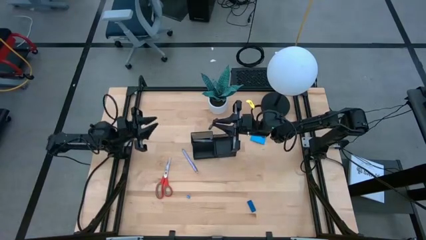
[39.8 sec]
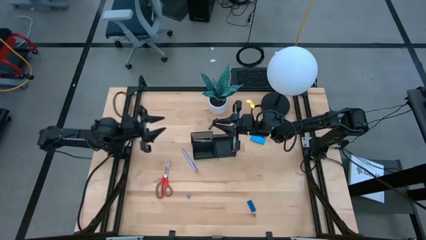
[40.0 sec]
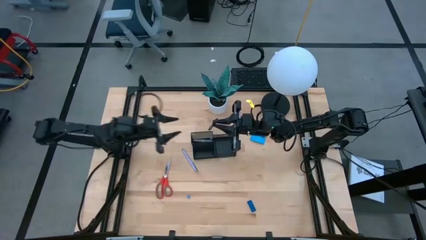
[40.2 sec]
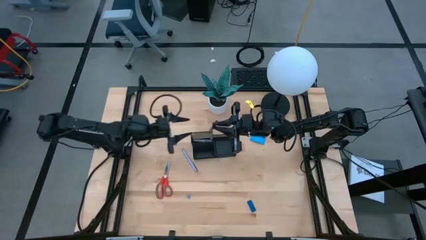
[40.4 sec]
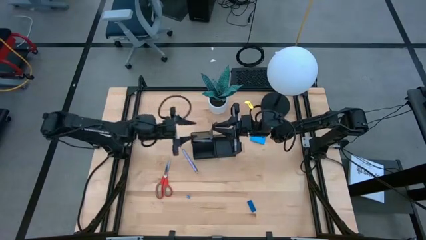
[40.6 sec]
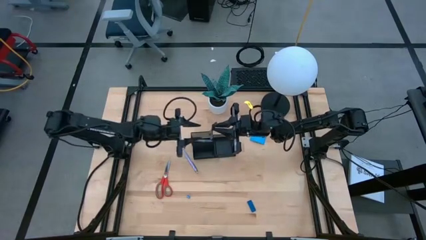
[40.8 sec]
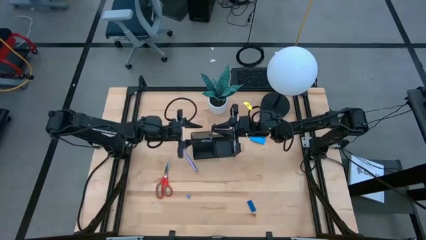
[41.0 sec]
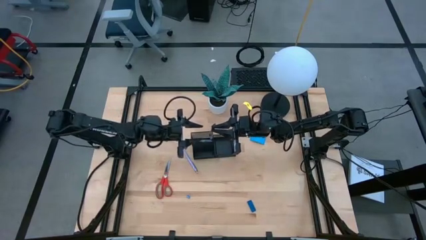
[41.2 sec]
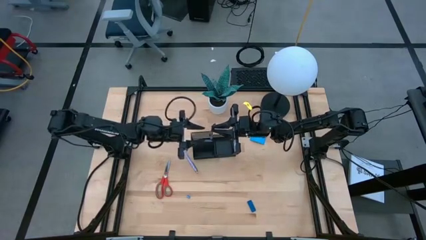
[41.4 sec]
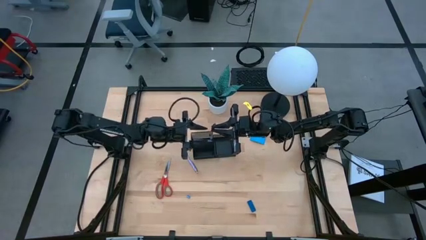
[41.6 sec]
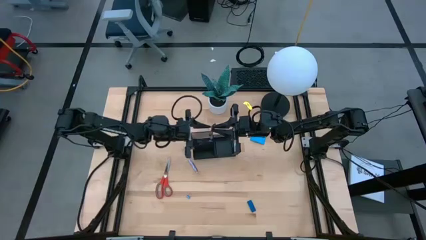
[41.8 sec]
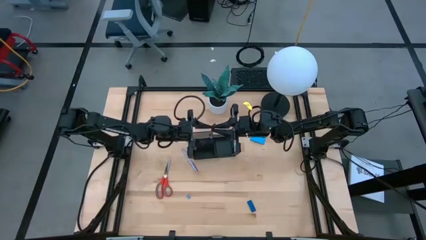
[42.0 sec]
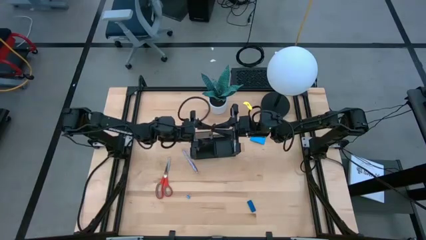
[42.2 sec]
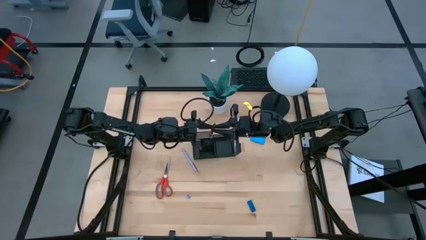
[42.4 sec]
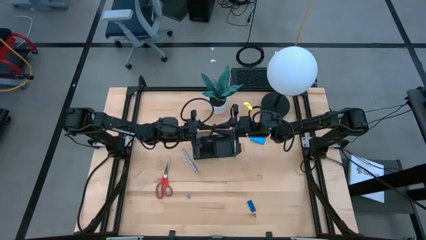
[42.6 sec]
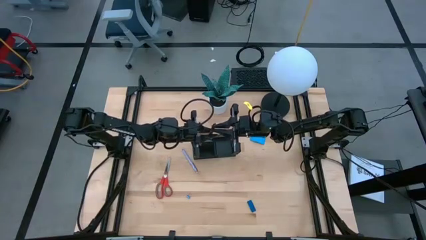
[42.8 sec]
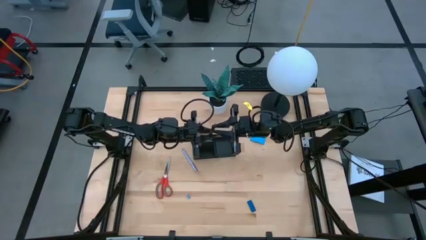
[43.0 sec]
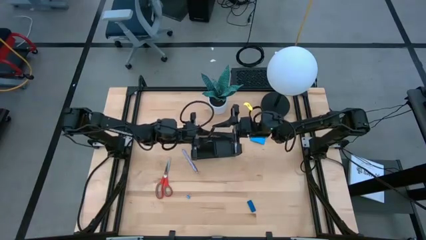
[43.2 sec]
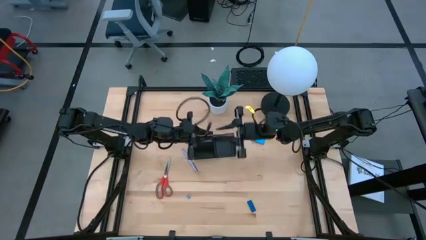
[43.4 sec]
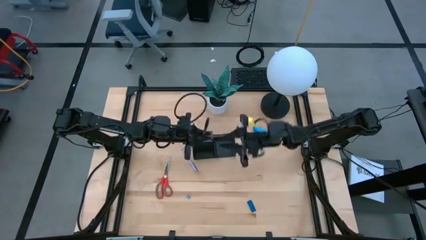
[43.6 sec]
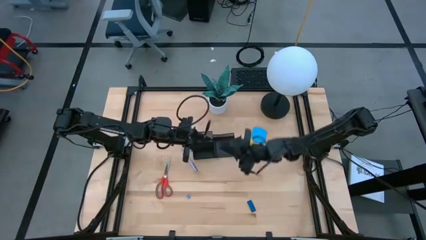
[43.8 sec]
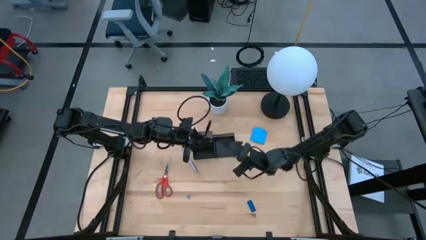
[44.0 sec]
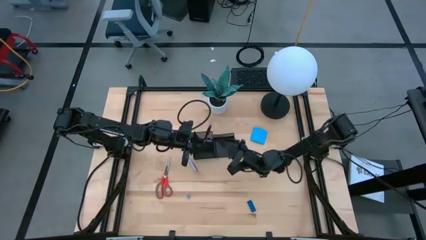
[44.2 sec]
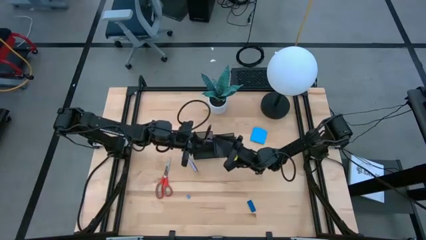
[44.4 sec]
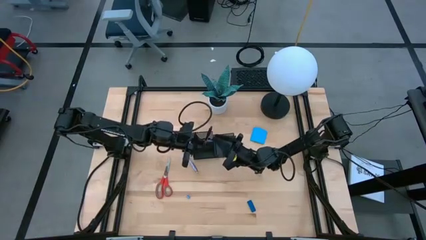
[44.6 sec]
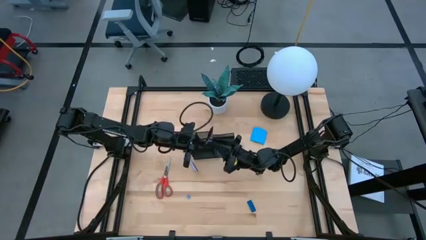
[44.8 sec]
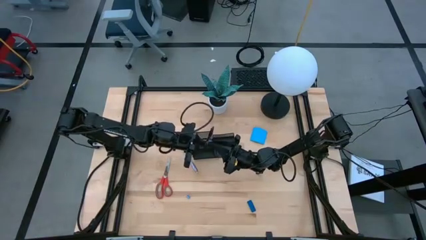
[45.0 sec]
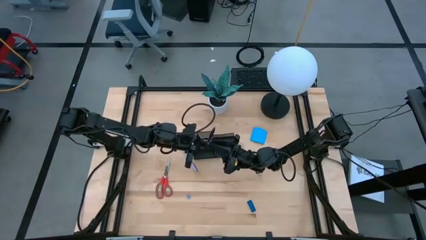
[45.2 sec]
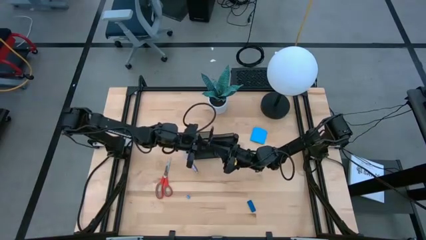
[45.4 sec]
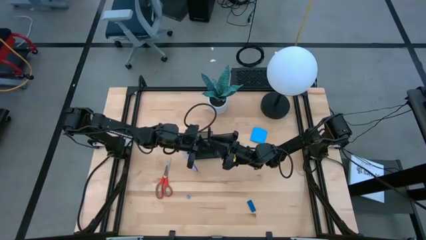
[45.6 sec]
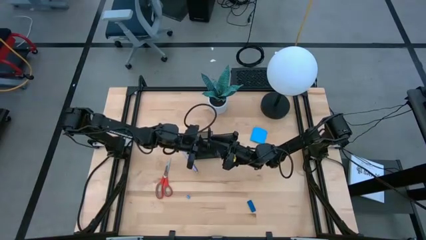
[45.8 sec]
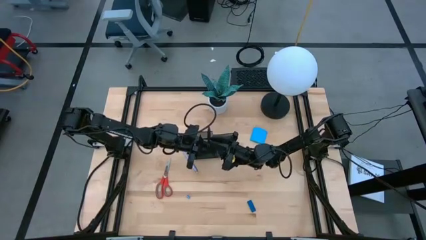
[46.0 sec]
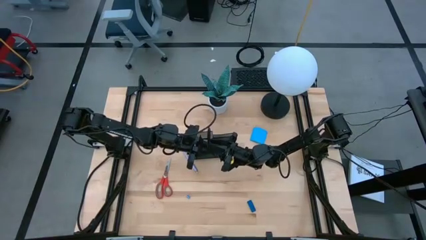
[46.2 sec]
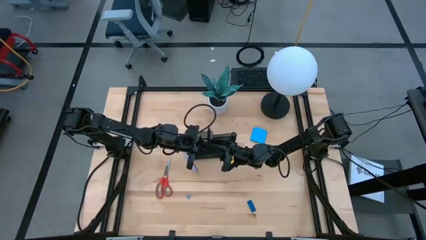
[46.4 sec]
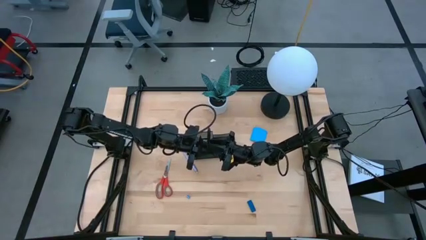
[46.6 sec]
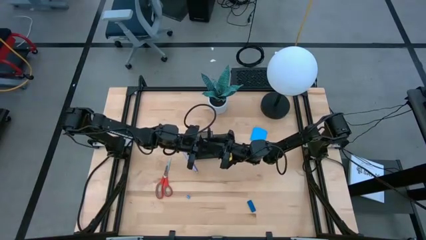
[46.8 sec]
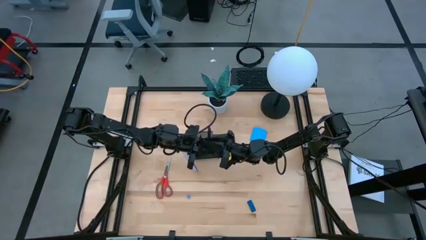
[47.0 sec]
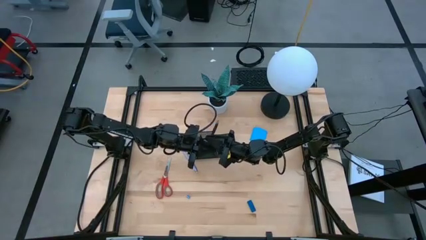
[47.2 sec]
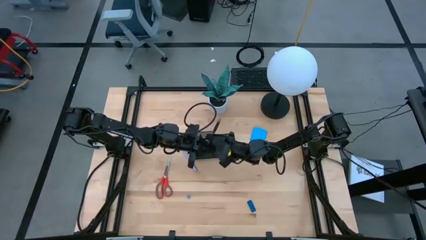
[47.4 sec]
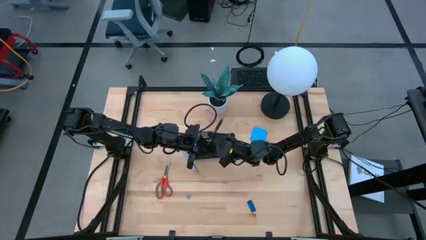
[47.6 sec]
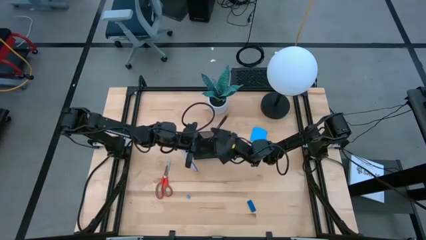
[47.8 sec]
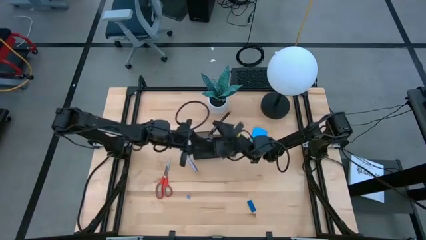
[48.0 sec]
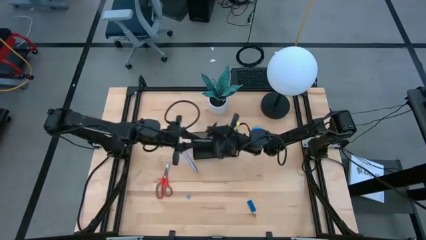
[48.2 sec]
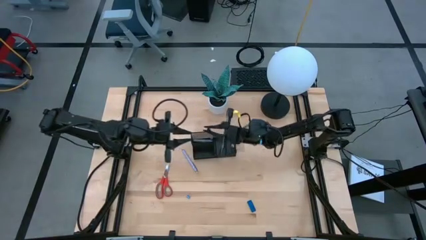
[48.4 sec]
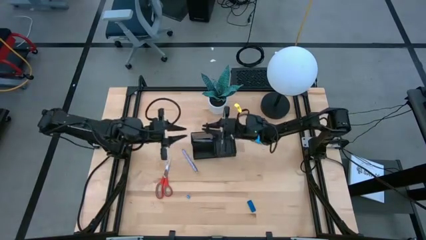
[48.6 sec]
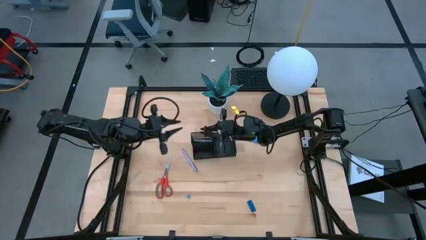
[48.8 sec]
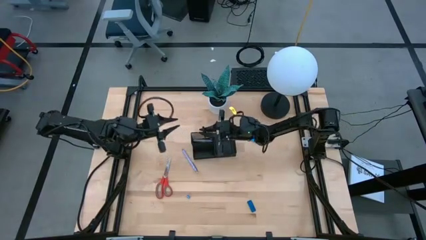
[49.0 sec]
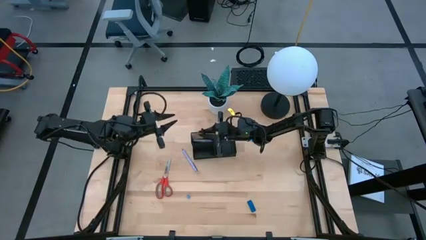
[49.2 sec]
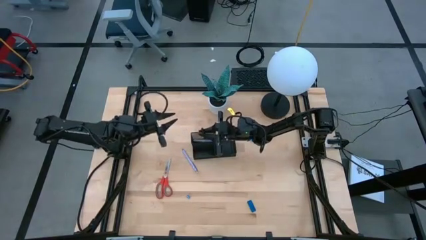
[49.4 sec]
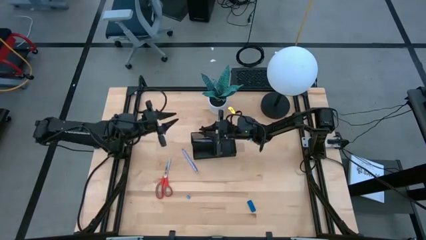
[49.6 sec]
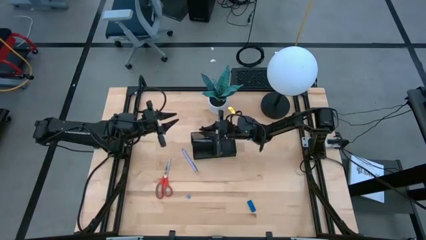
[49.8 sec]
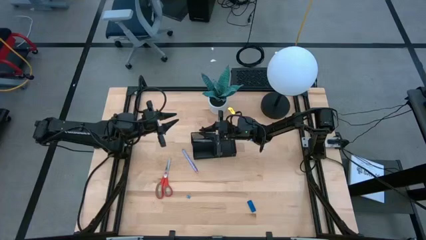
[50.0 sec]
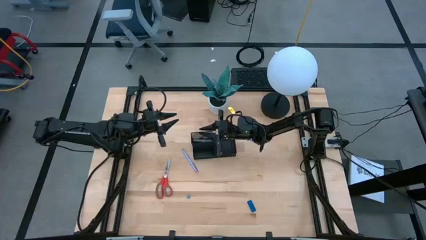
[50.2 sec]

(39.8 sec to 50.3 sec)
Task: Pick and place office supplies into organizer
Put the black pen into the top left section of the desk organizer

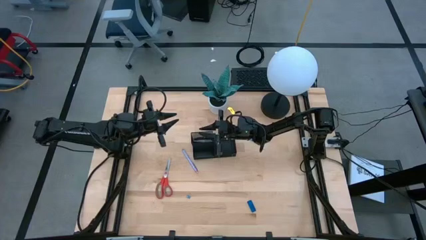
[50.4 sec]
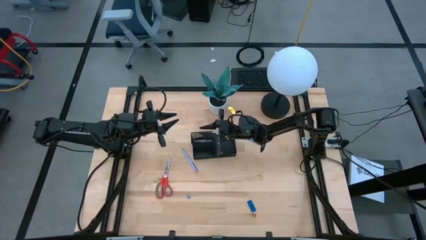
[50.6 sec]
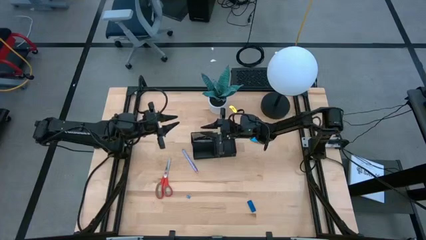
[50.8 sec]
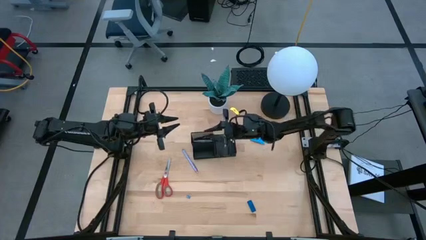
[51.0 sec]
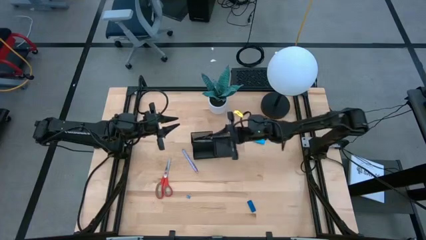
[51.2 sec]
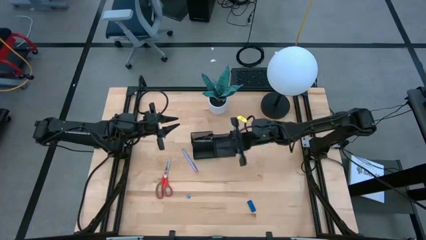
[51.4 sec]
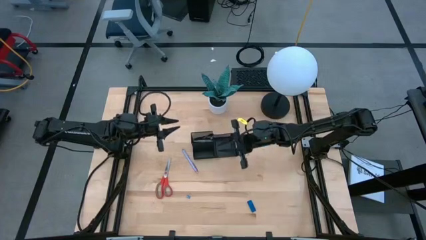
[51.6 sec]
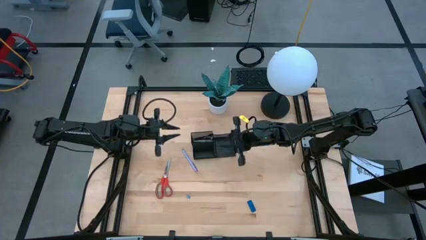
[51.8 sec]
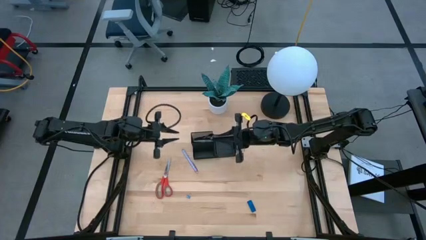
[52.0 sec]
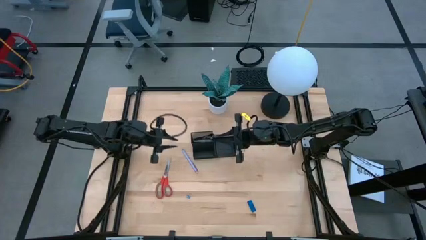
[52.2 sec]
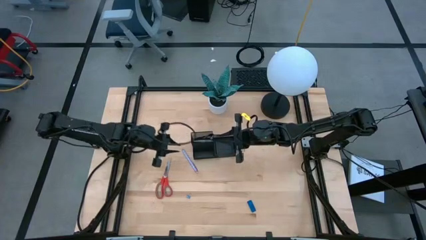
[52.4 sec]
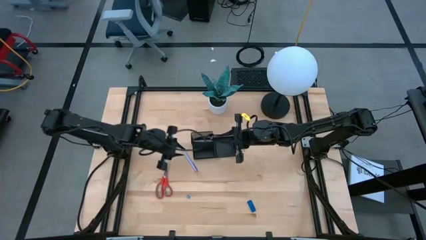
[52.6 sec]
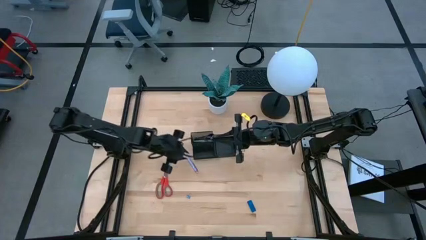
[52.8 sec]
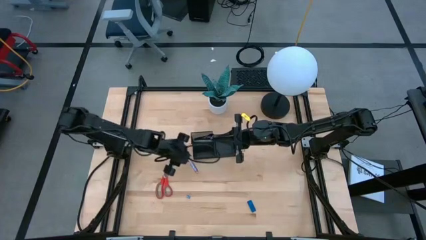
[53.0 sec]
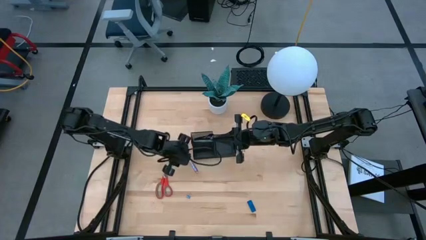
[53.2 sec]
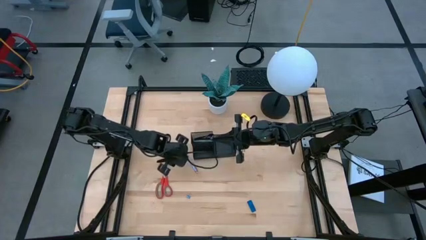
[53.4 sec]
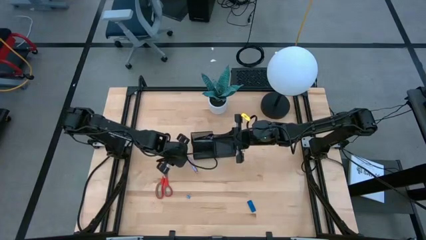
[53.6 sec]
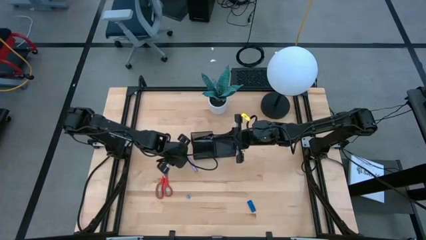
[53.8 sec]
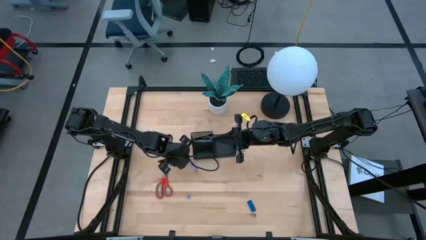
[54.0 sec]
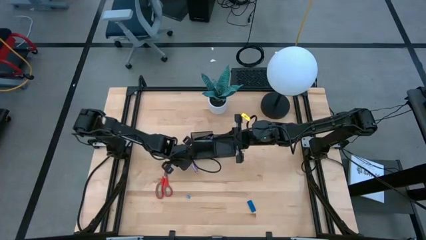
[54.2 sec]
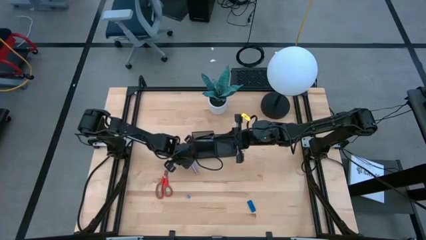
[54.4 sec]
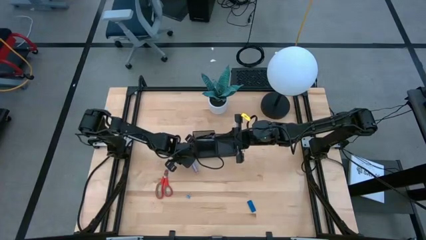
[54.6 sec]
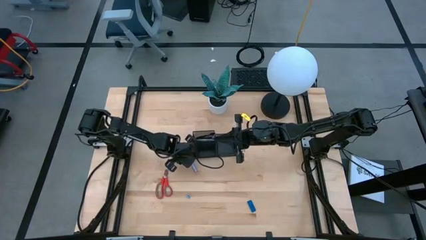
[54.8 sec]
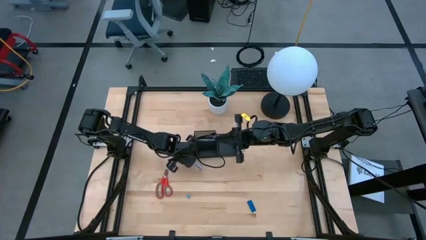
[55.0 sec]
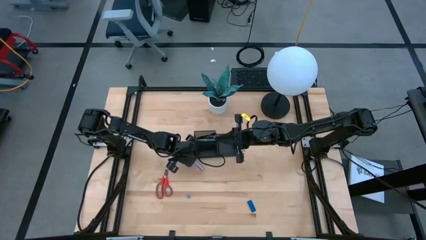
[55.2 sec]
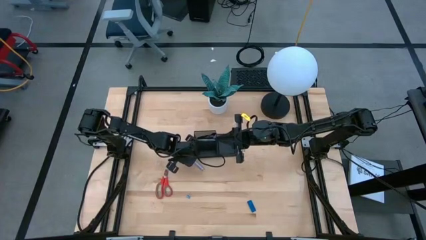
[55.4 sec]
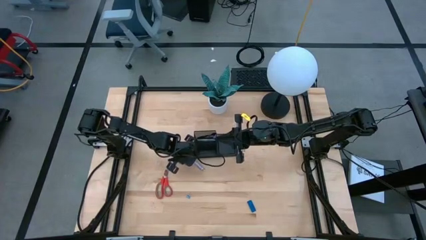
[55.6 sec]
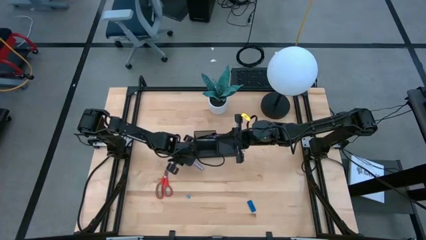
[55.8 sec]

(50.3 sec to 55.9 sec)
Put the purple pen into the top left section of the desk organizer
